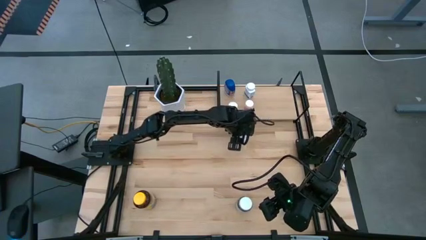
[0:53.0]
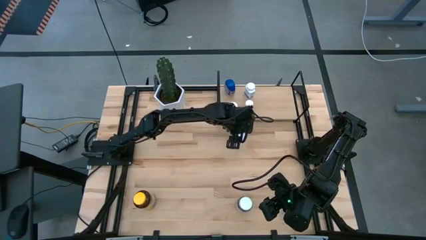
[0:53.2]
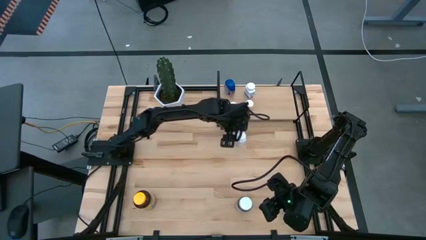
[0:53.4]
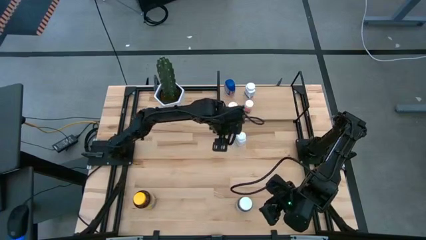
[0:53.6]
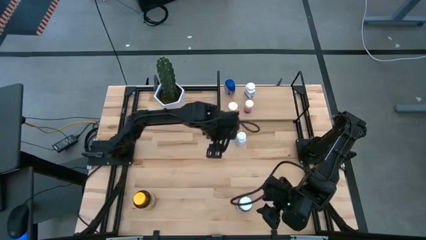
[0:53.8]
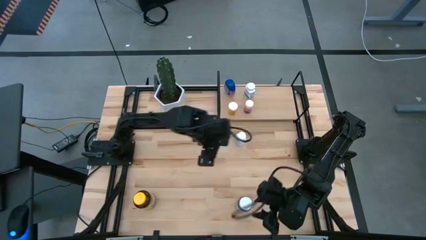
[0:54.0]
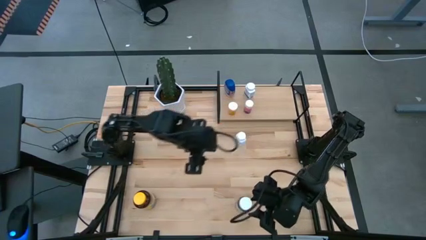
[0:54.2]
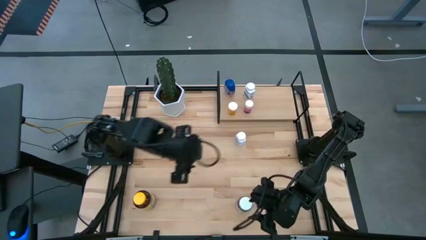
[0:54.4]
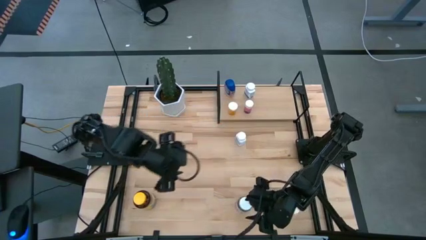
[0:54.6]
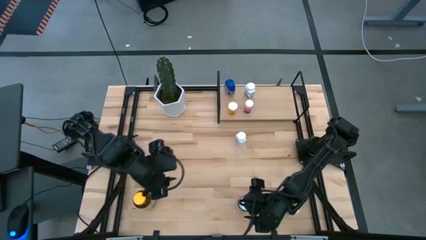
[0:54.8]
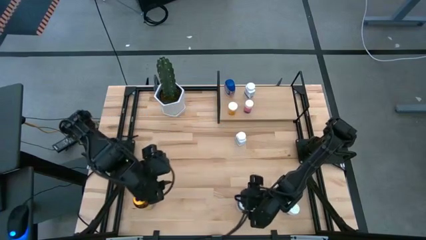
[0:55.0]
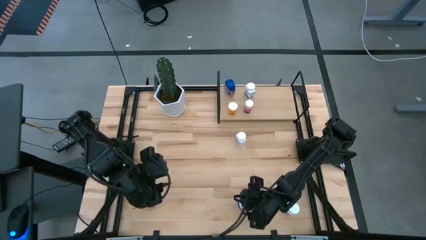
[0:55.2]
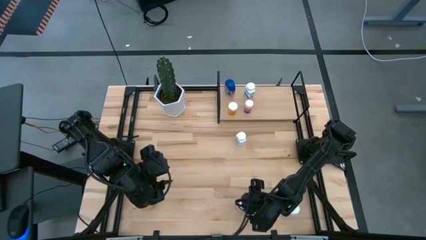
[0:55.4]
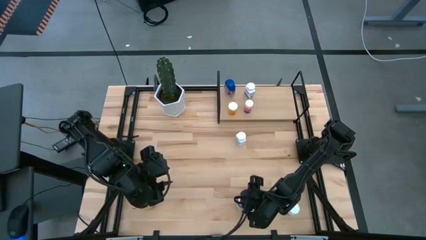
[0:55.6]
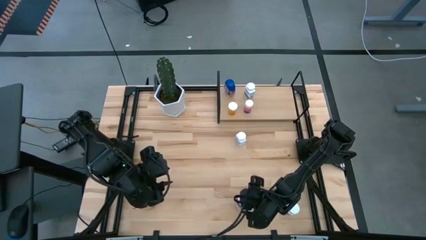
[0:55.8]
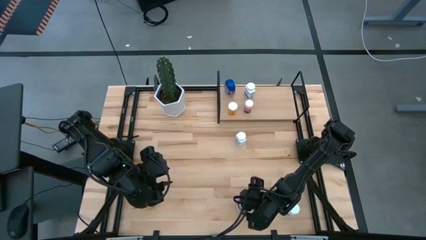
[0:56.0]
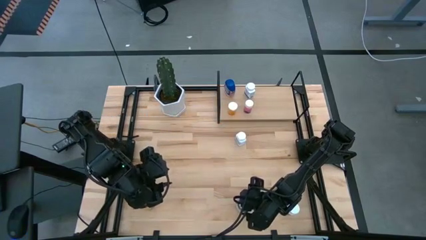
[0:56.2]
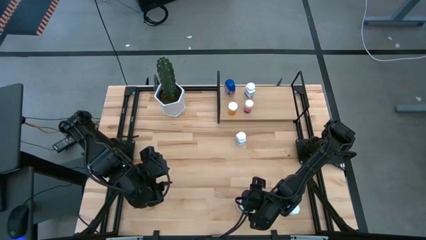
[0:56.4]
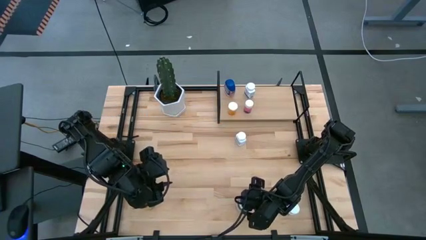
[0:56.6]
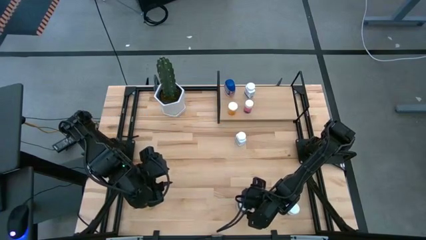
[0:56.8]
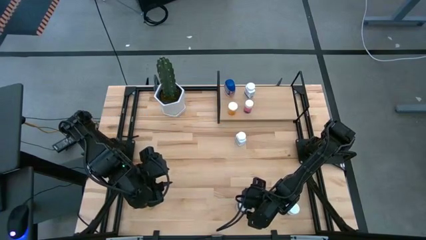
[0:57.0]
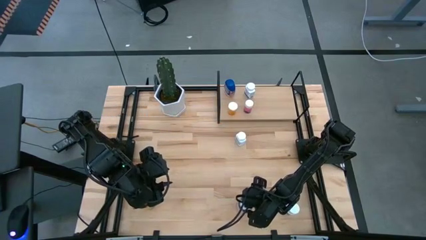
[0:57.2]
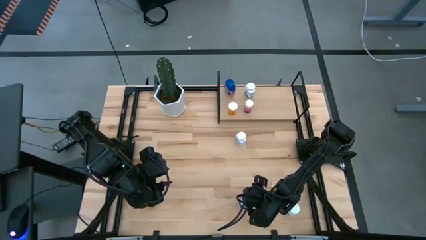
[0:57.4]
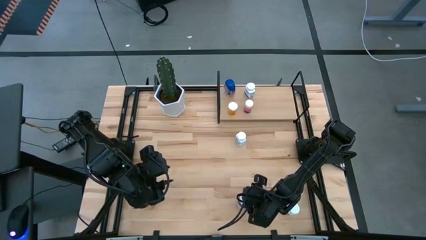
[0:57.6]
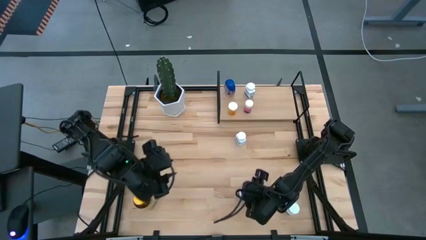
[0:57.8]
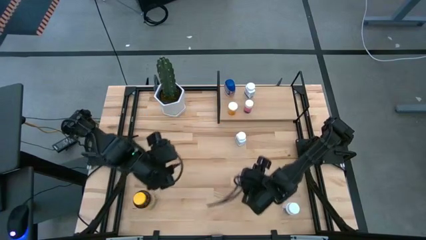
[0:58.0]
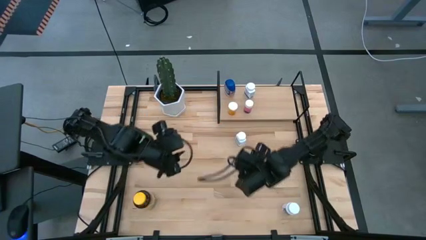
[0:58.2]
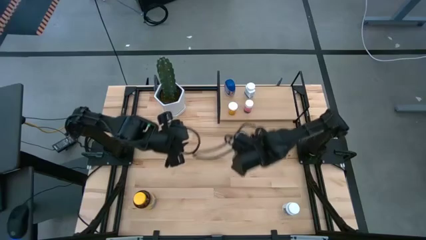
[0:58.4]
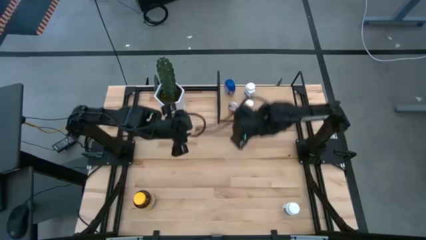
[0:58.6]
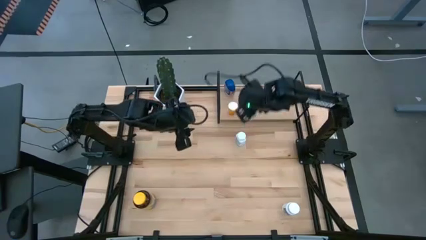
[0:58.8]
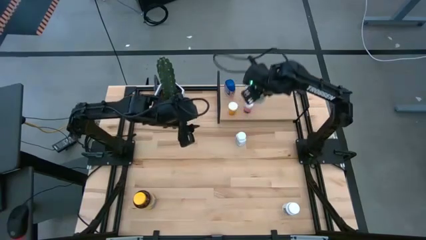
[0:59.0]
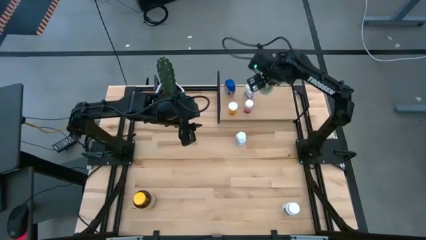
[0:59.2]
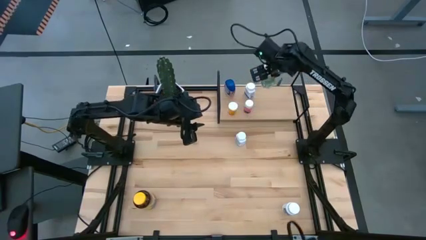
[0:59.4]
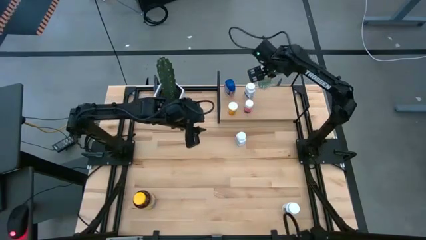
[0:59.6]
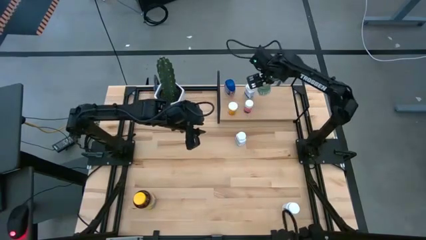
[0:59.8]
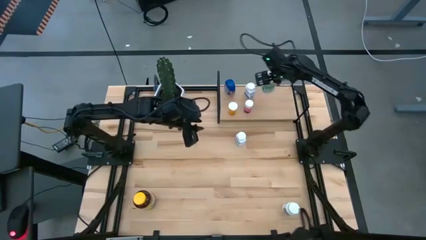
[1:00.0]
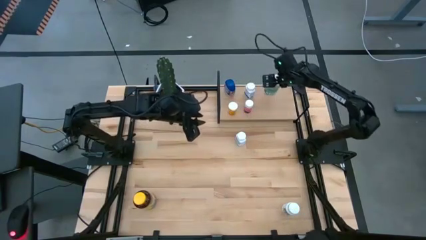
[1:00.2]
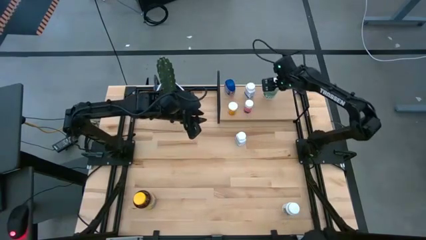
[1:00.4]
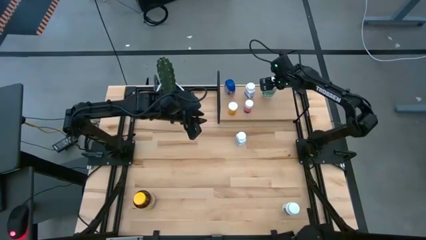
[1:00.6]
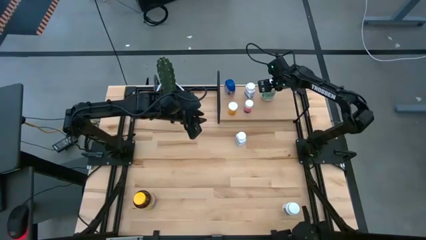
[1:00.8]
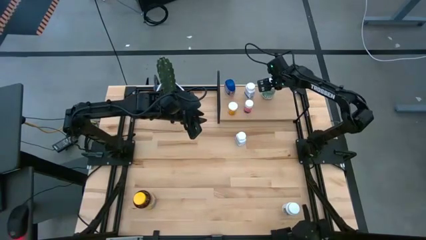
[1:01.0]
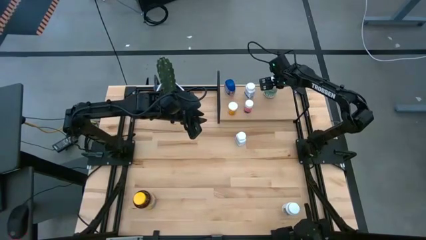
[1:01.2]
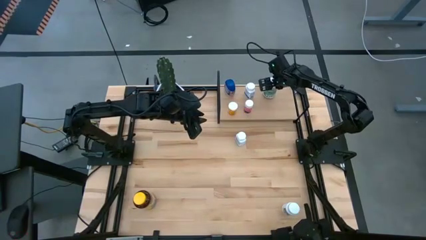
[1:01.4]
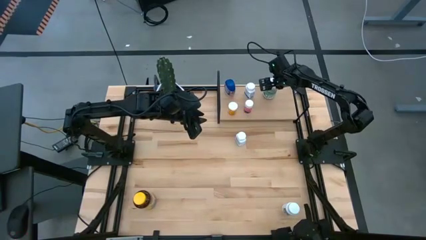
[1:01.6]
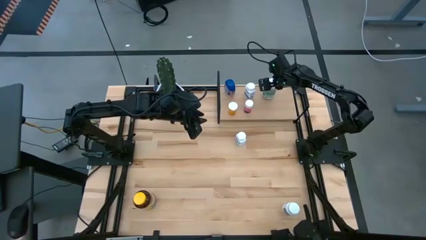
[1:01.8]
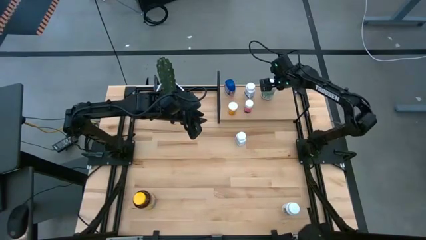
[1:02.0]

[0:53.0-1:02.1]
Task: Pick and place medicine bottles onto shelf by color
Put the green pill bottle on the shelf

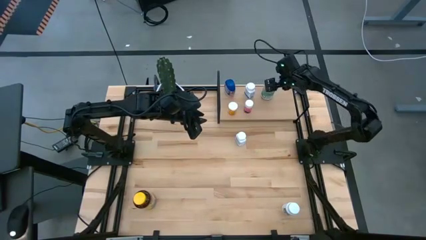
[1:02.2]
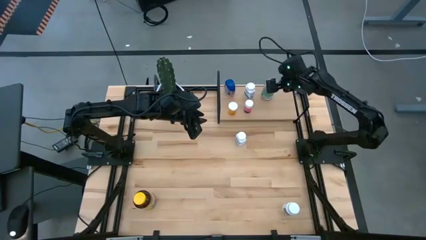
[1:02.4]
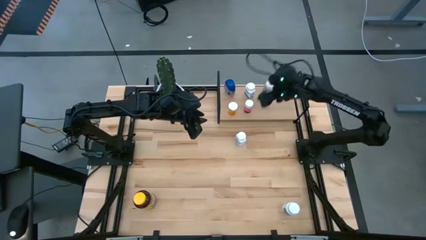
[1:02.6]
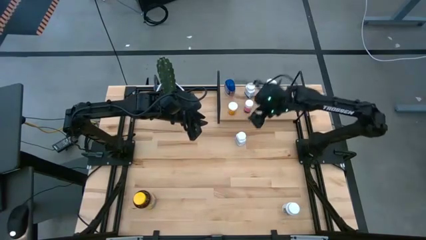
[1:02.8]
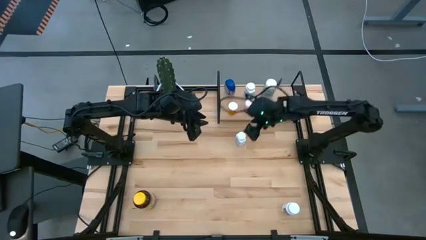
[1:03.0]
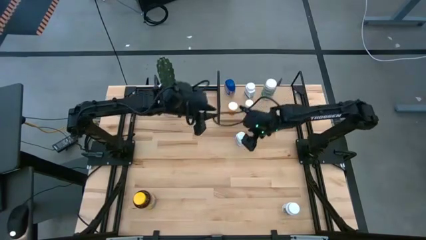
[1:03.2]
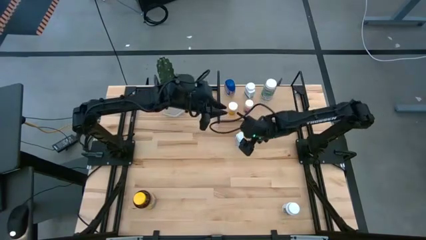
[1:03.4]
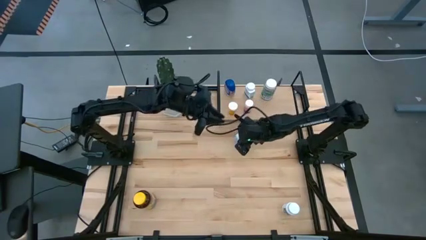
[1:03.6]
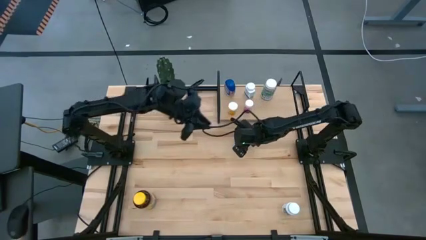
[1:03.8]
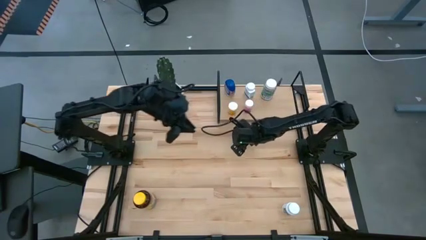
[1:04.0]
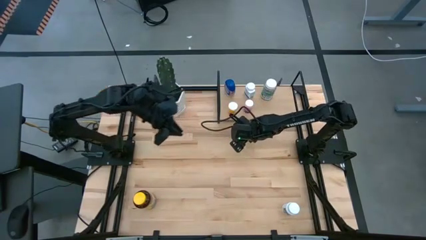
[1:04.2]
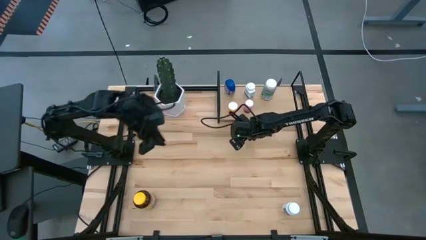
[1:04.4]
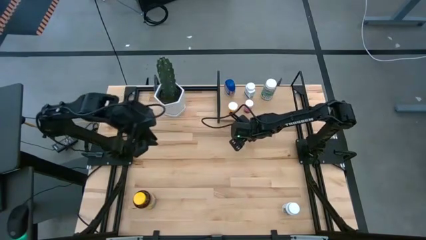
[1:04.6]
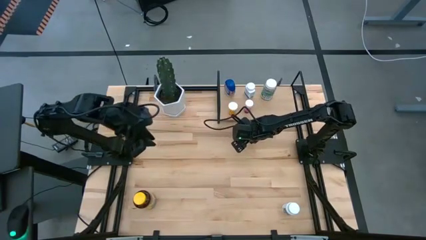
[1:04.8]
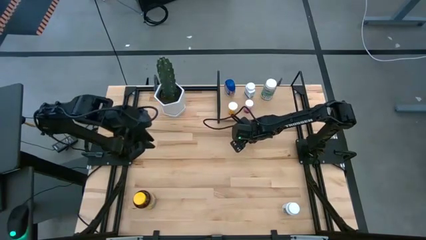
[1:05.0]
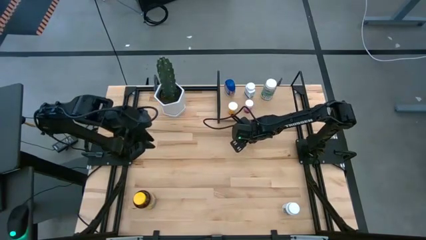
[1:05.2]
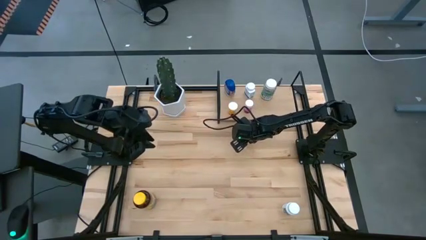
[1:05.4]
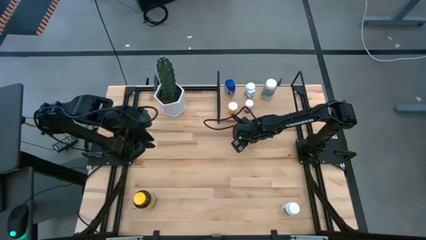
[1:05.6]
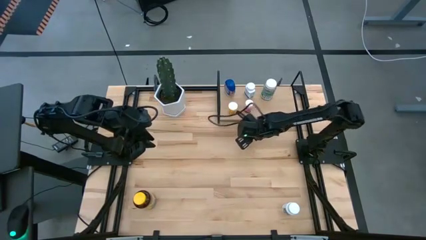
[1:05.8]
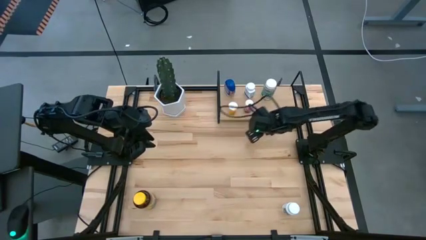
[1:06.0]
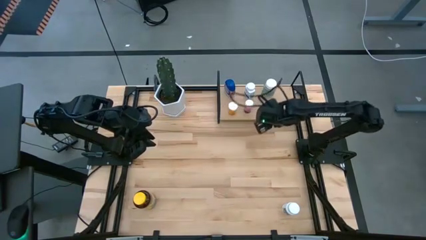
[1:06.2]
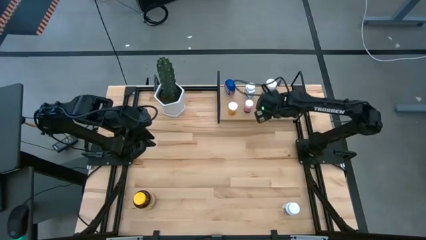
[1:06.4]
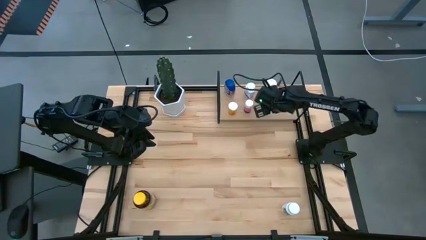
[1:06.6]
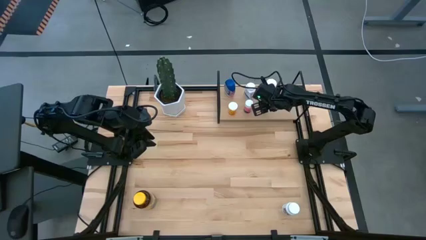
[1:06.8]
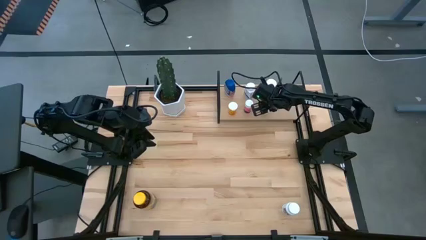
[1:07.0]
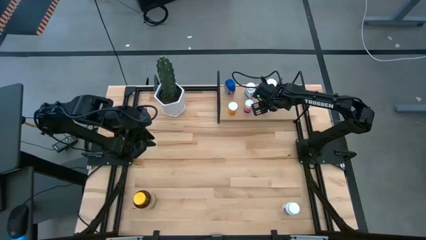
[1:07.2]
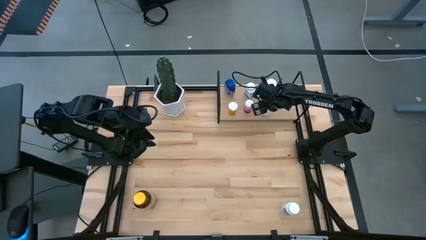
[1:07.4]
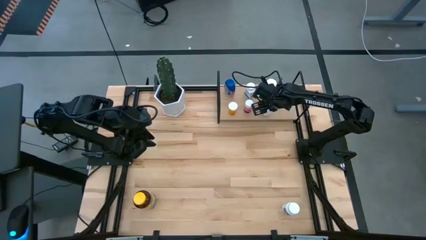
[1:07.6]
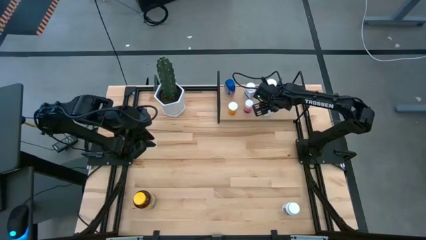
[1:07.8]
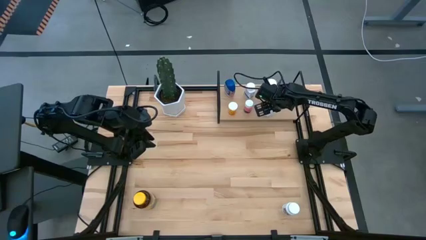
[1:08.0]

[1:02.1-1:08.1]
Put the white pill bottle on the shelf

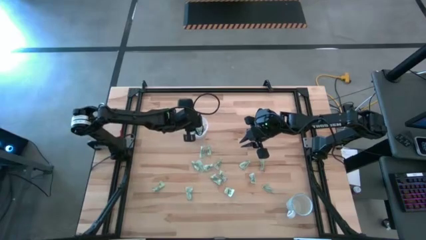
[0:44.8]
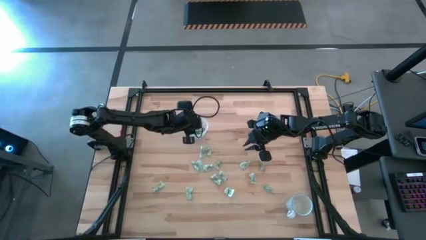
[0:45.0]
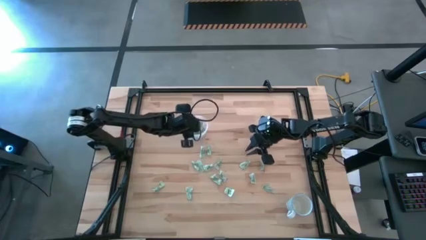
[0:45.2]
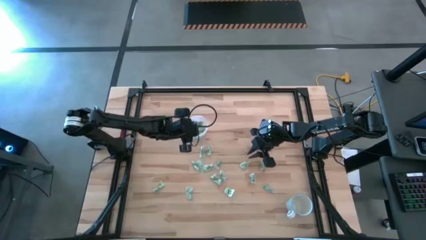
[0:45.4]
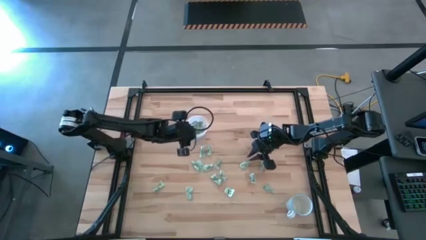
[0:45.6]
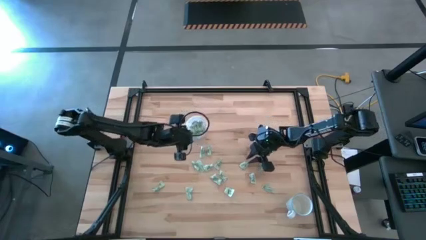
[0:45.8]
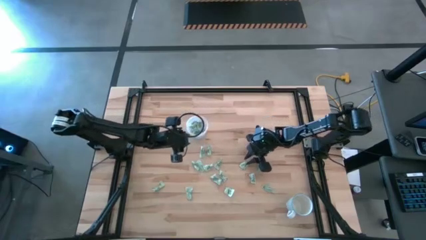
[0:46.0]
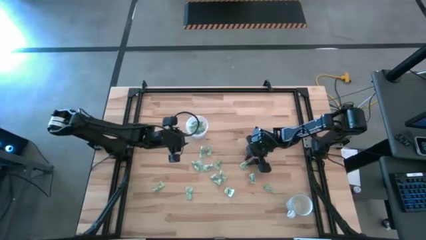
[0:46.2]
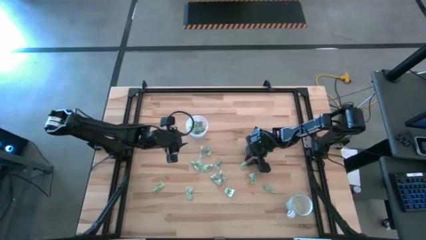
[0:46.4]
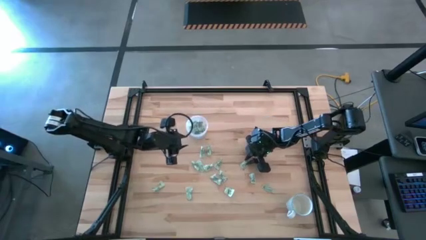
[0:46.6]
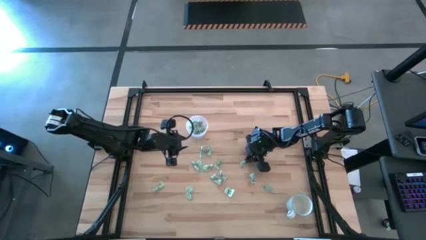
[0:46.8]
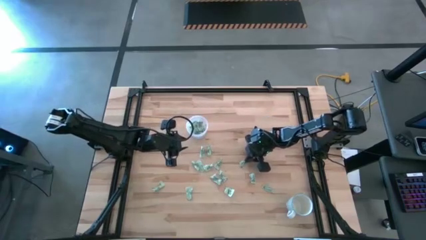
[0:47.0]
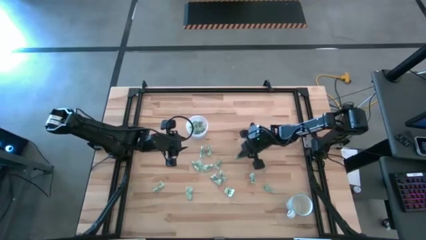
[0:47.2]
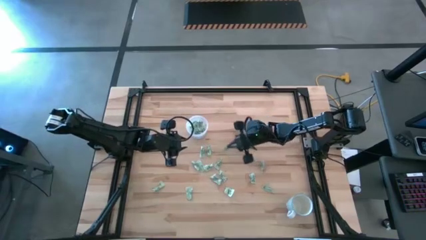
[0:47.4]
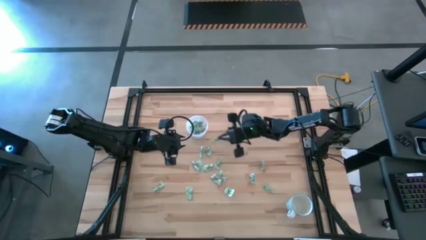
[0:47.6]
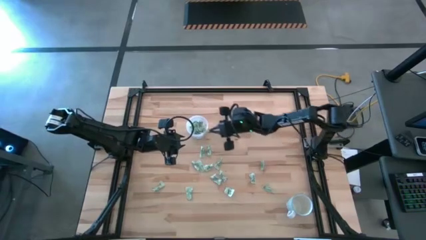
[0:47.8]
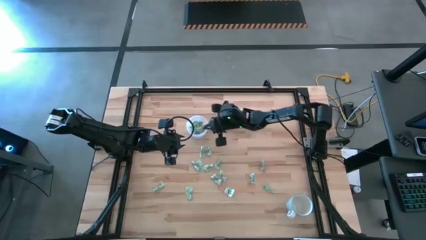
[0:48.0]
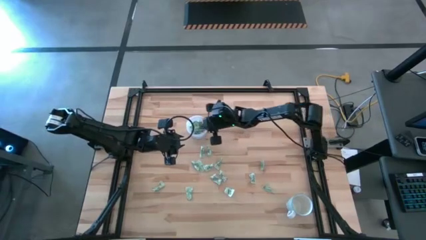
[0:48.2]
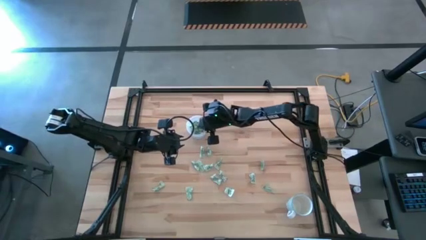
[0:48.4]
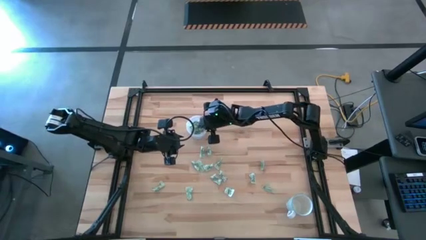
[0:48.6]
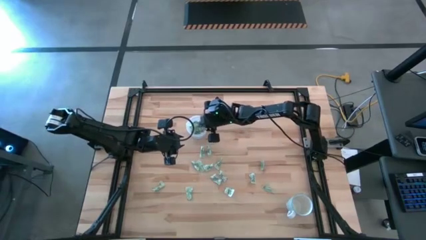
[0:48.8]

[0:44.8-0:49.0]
Task: Pick and place Stevia / Truvia into bins
Put the stevia packet into the transparent container
